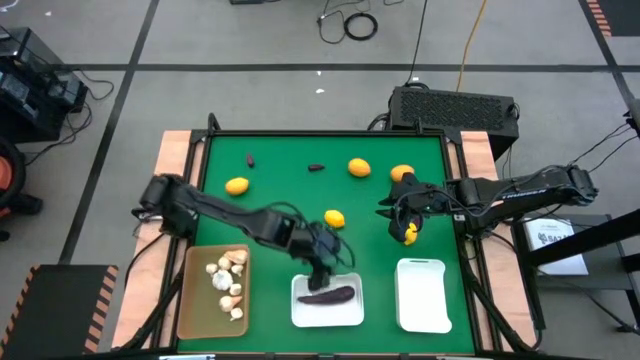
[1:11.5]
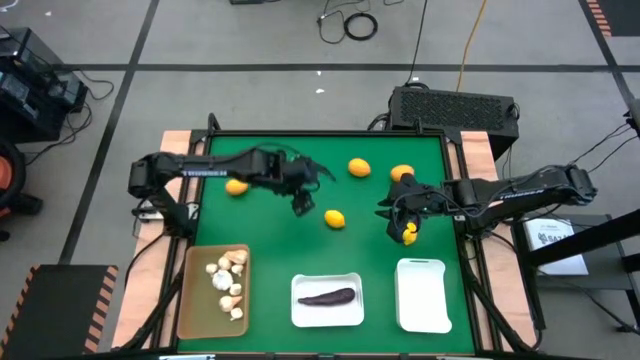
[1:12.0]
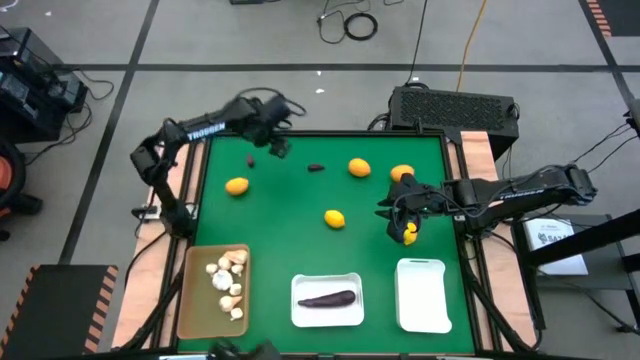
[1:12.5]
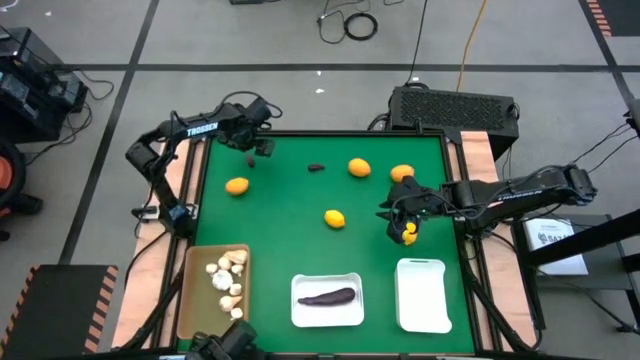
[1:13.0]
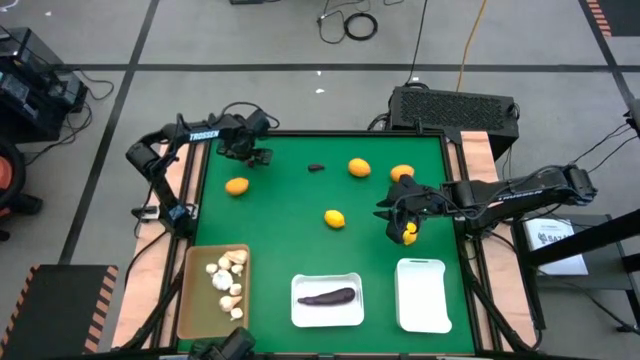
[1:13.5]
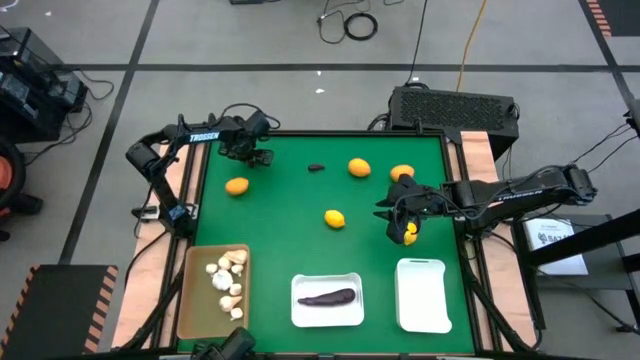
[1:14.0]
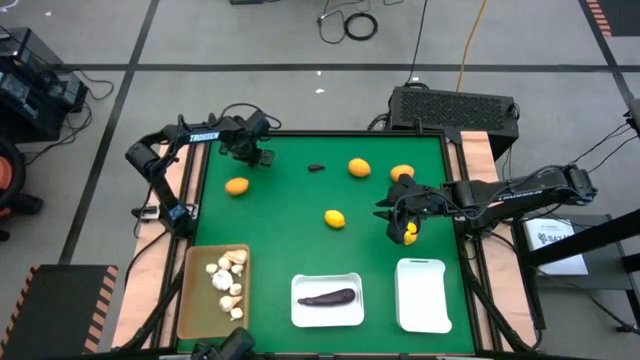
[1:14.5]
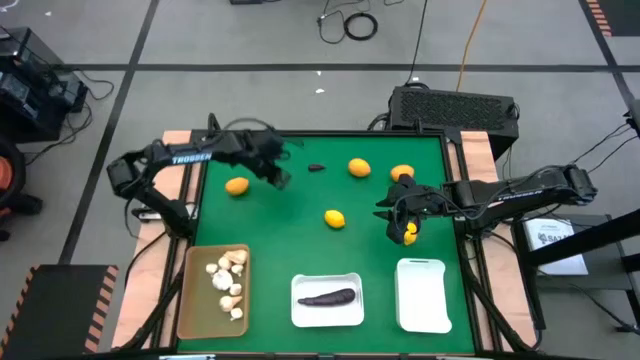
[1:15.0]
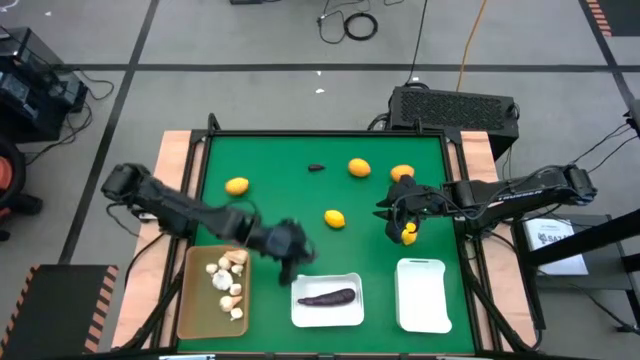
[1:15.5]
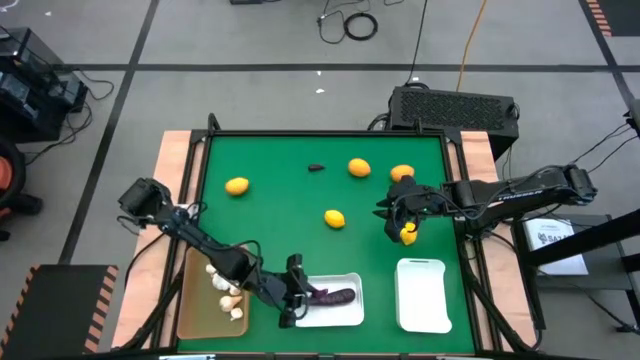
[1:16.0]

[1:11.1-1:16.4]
Task: Sort produce into baskets
Put the eggplant into the left white bin

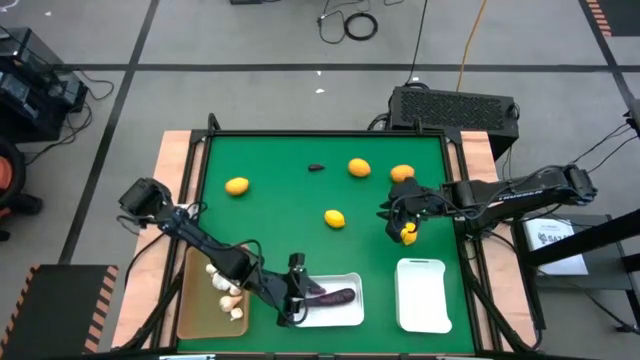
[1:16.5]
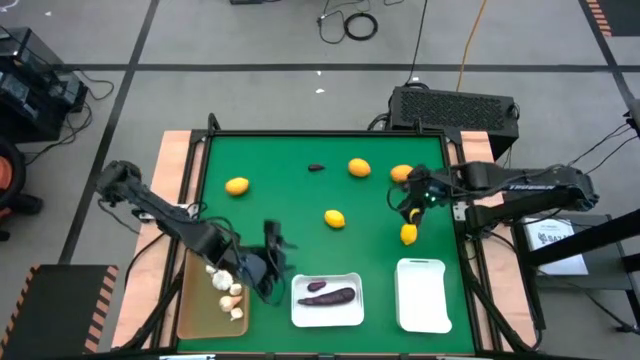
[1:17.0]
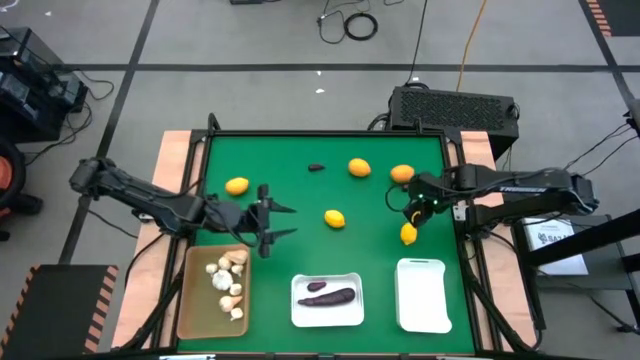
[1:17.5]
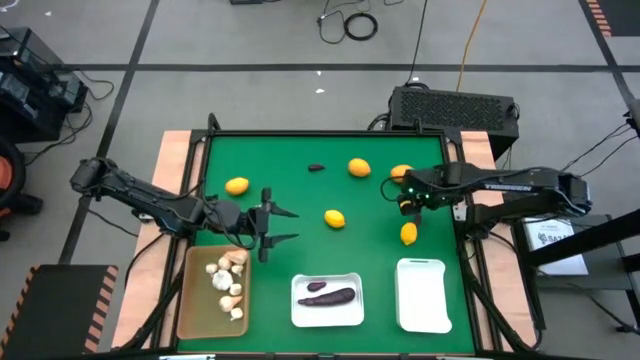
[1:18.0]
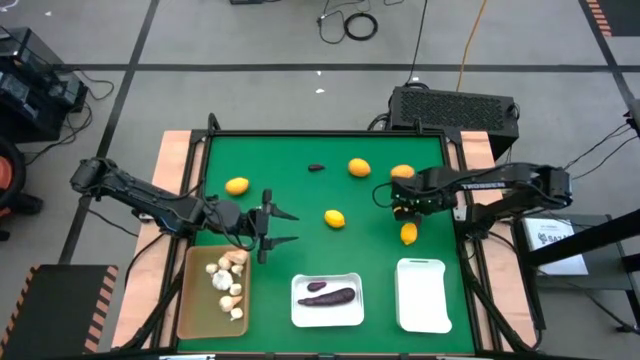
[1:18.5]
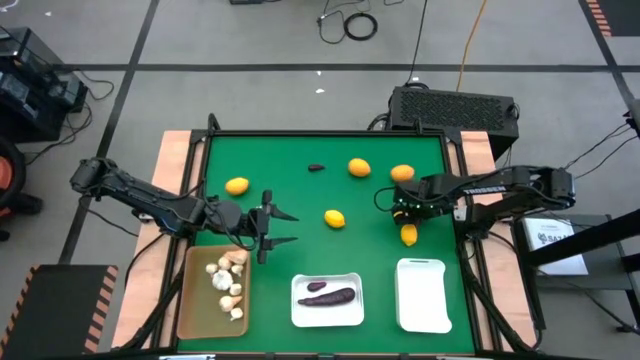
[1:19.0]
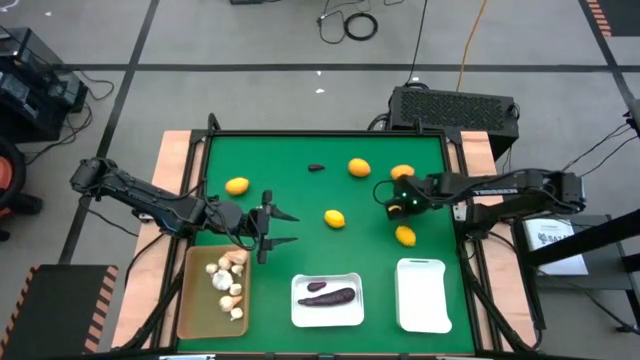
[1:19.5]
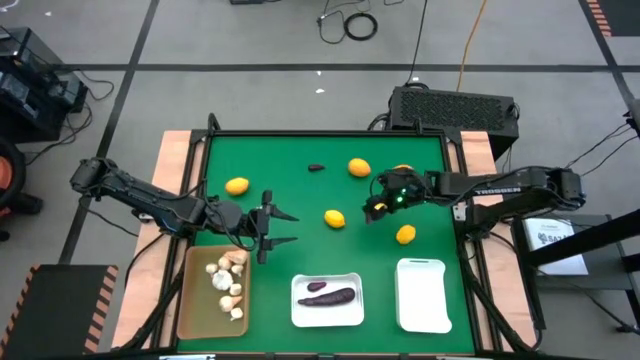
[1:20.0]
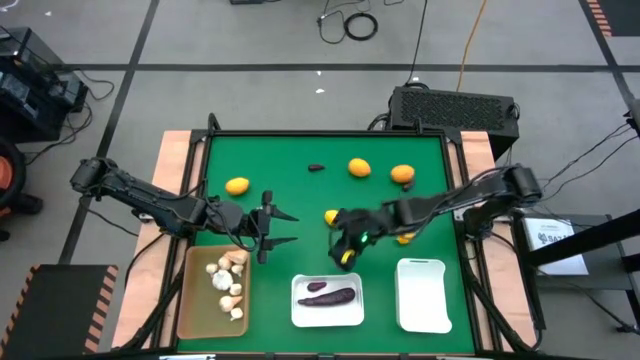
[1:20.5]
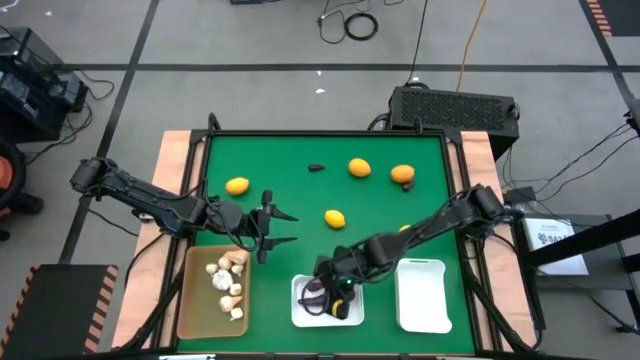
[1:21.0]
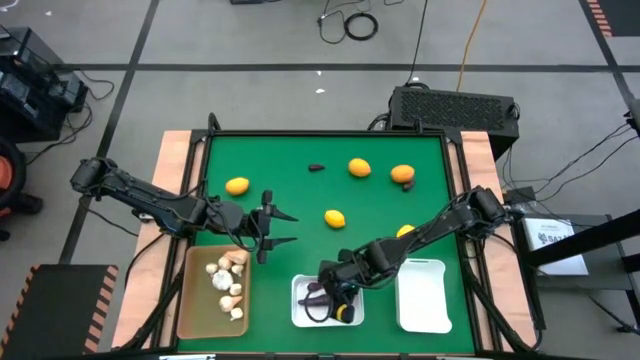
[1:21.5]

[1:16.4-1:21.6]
Put the eggplant into the left white bin

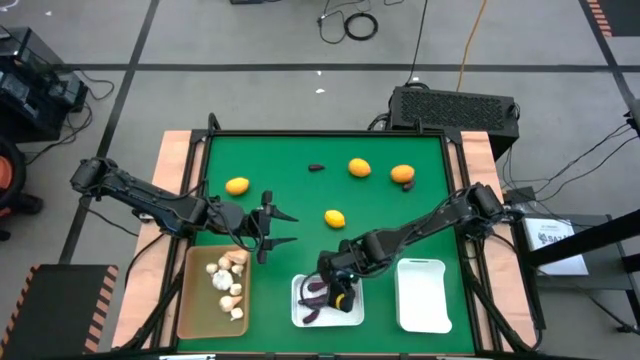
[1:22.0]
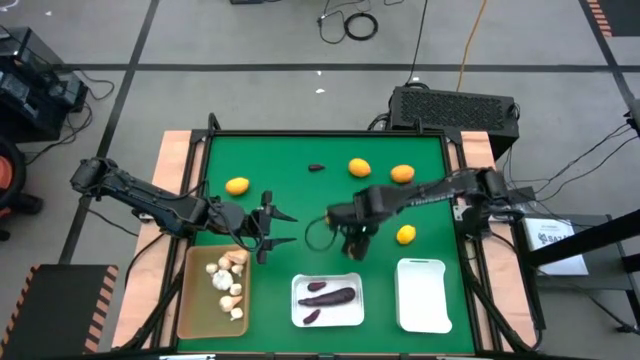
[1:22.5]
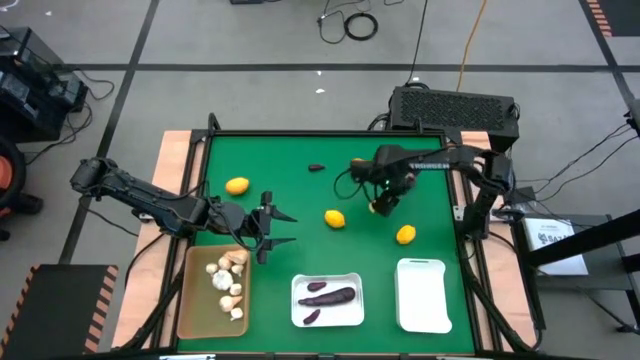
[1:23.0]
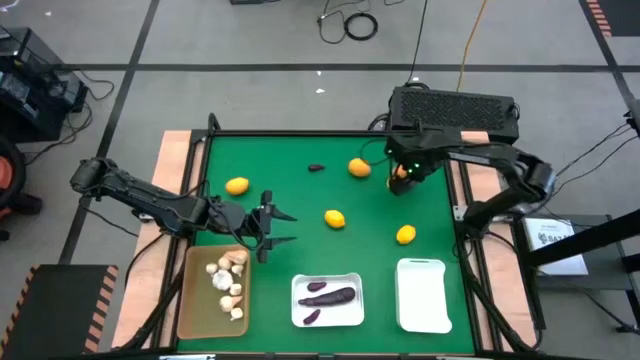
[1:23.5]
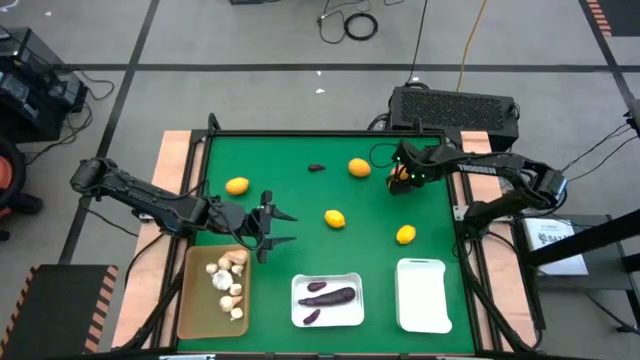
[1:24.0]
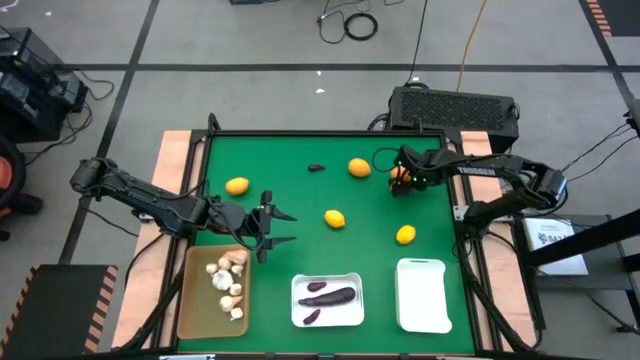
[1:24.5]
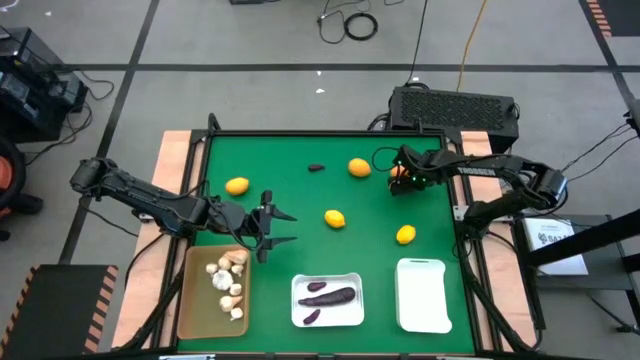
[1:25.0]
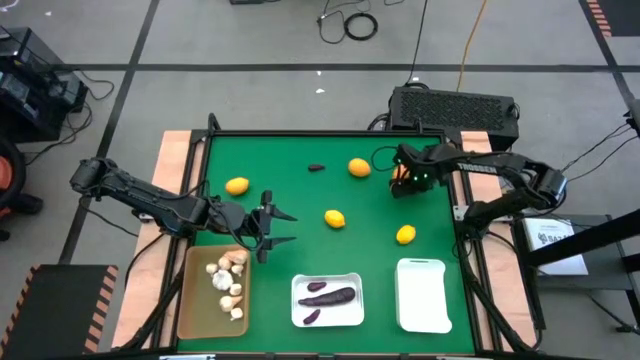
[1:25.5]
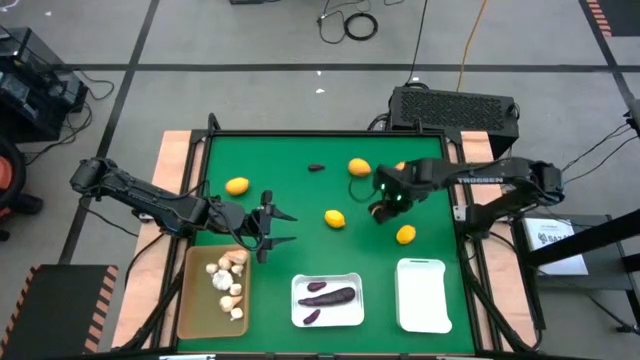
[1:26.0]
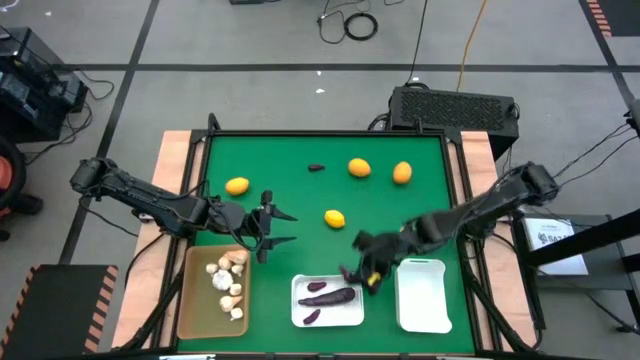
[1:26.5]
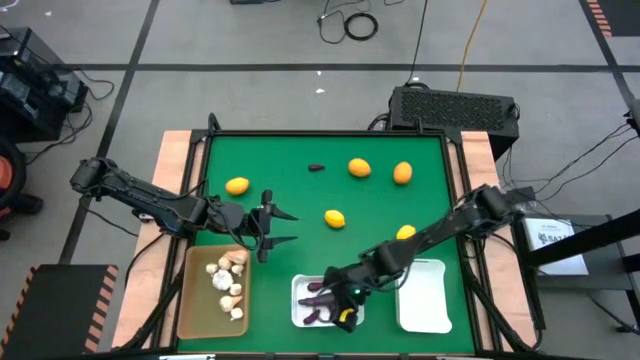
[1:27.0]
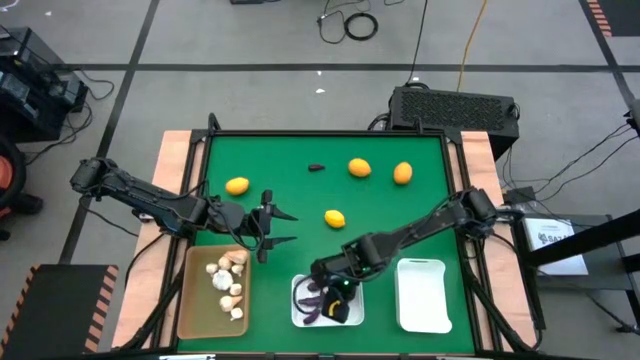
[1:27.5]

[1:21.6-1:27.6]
Put the eggplant into the left white bin

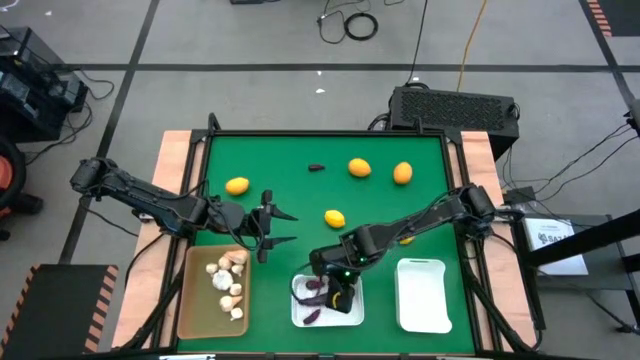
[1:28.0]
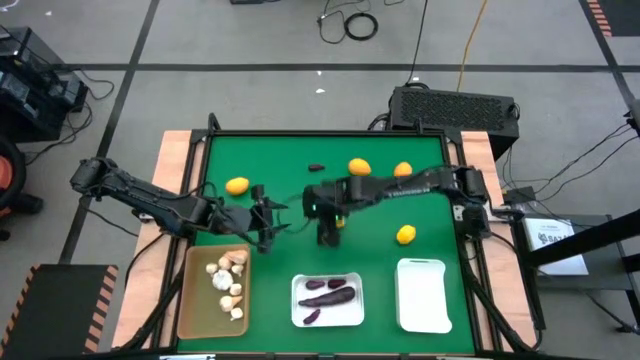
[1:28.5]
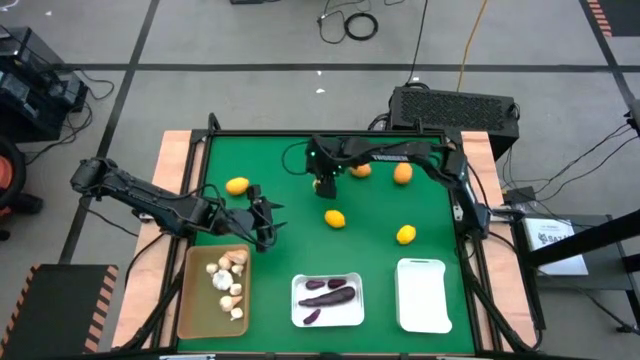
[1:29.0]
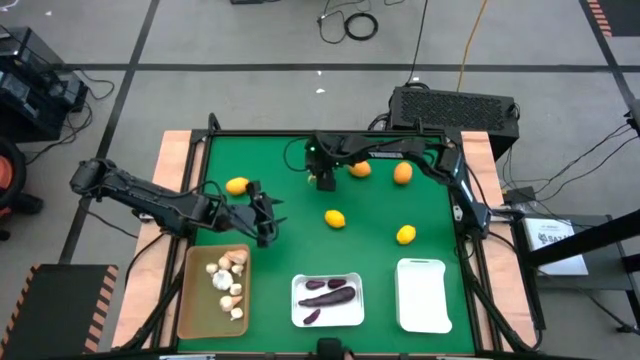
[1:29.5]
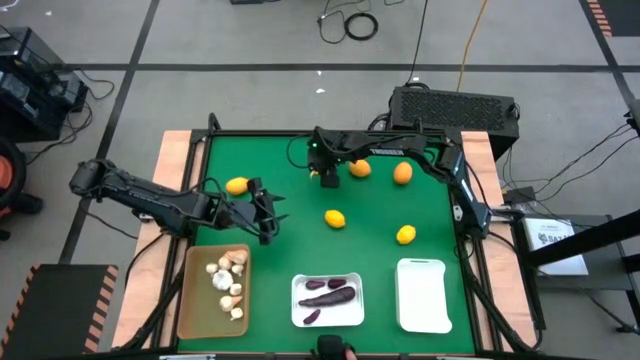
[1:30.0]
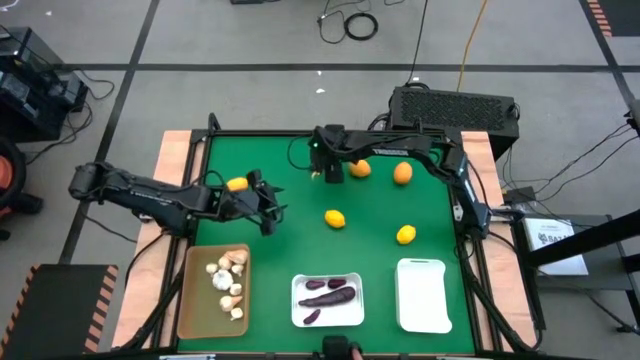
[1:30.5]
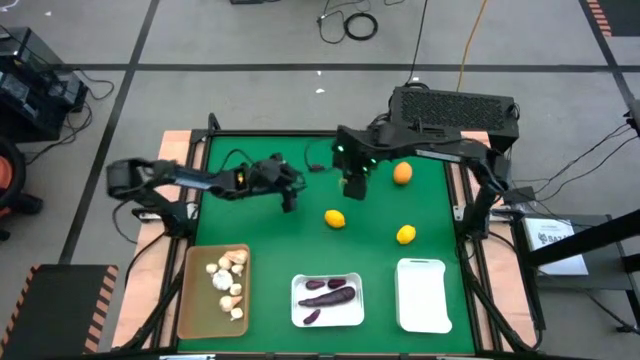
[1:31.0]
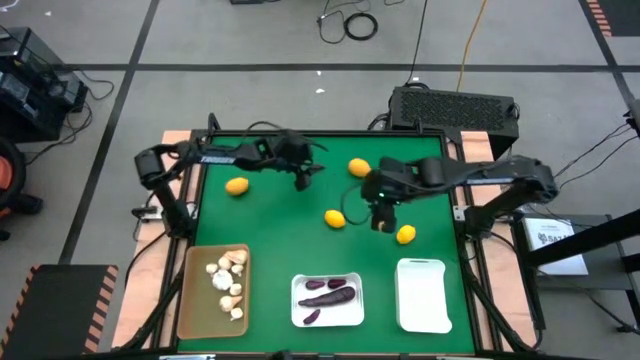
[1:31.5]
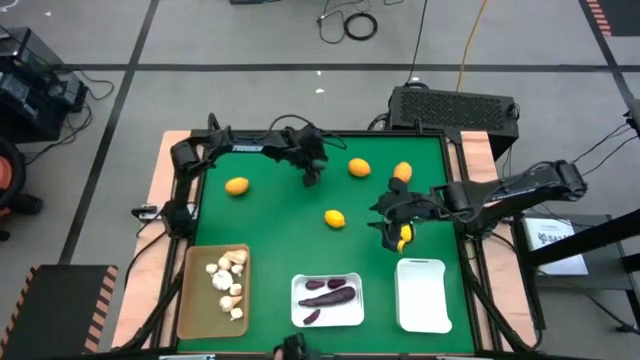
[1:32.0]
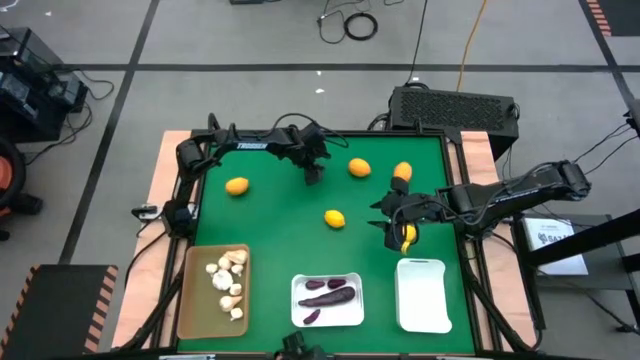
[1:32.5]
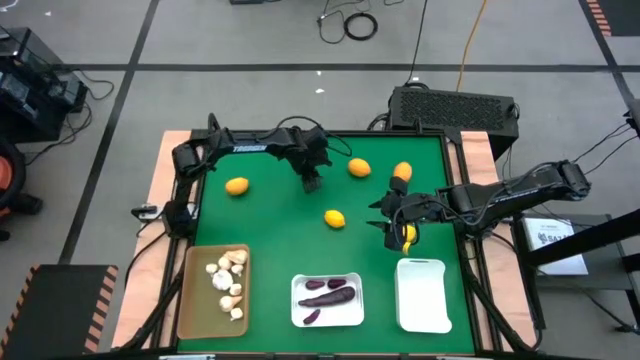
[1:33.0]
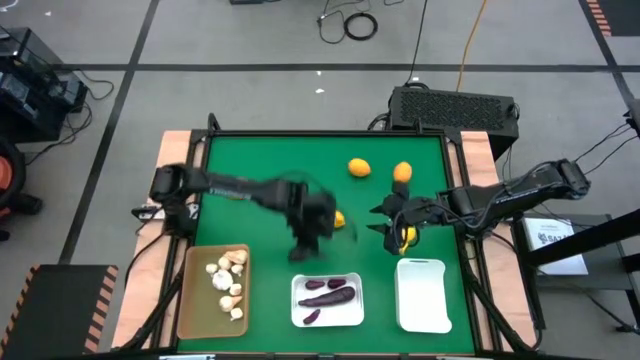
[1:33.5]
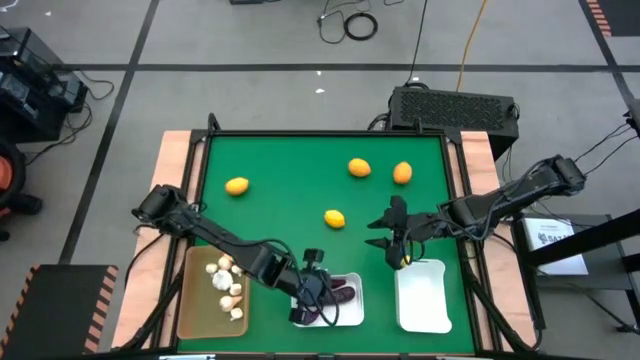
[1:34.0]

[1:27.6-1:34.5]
Put the eggplant into the left white bin
